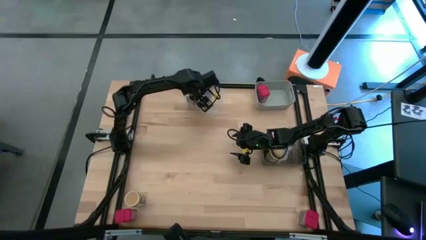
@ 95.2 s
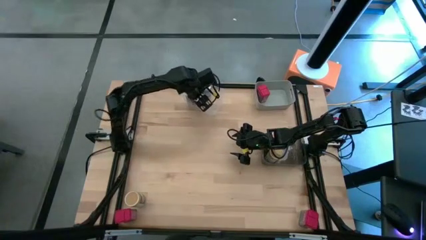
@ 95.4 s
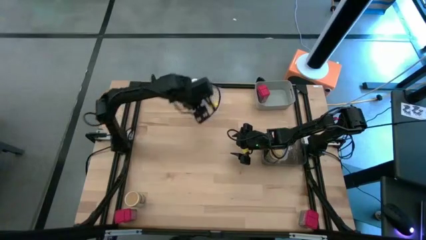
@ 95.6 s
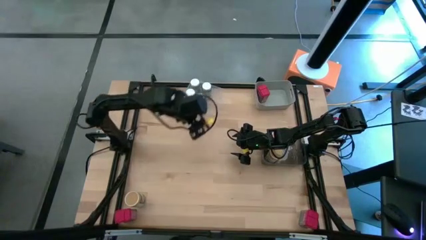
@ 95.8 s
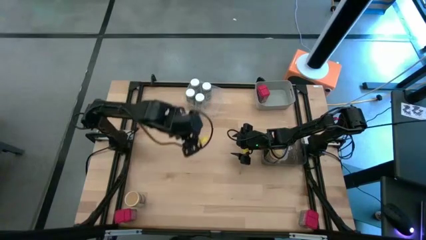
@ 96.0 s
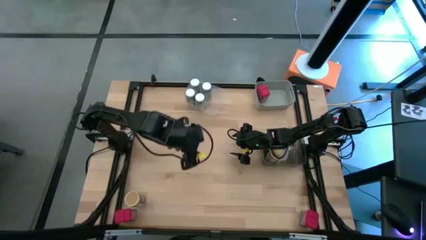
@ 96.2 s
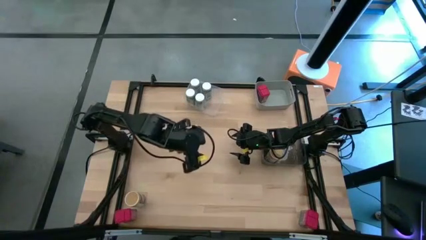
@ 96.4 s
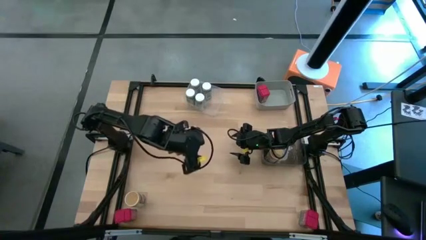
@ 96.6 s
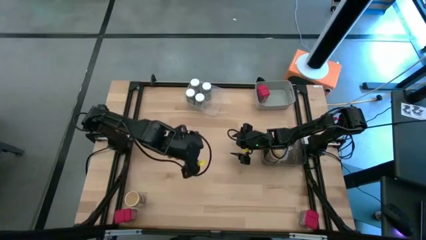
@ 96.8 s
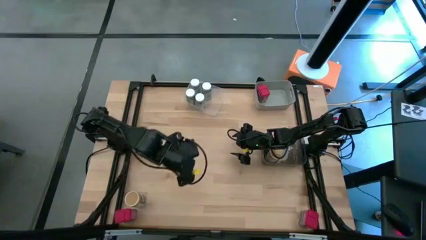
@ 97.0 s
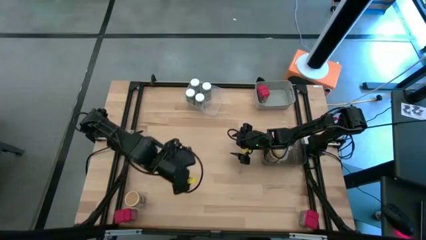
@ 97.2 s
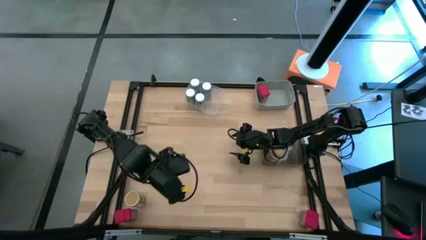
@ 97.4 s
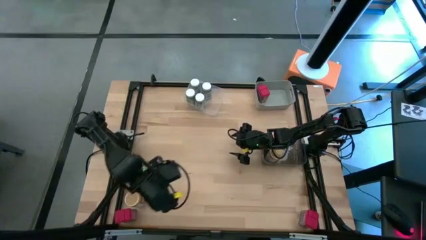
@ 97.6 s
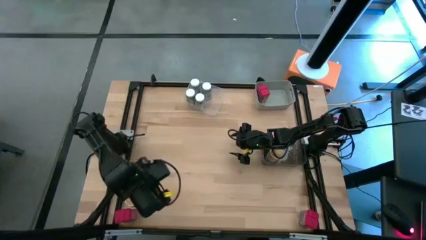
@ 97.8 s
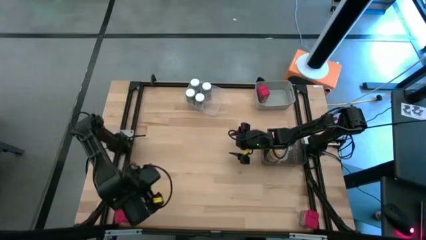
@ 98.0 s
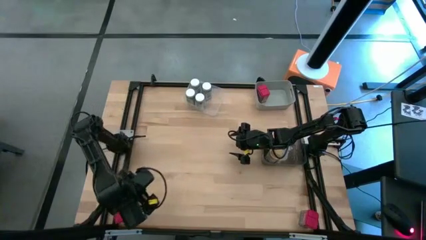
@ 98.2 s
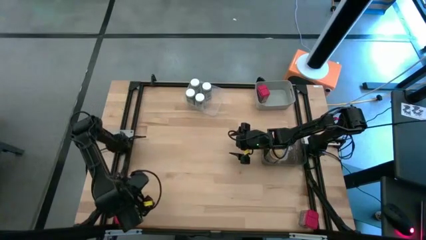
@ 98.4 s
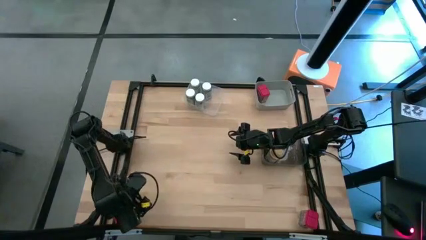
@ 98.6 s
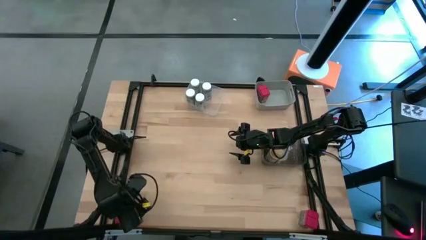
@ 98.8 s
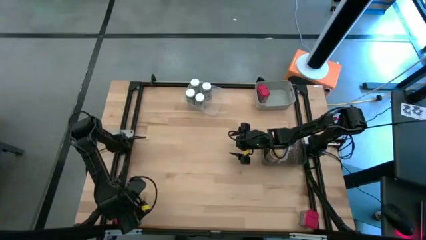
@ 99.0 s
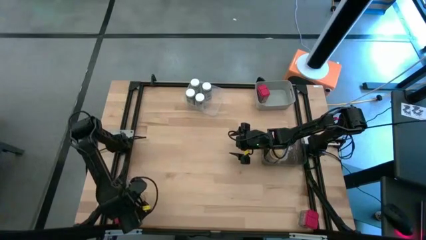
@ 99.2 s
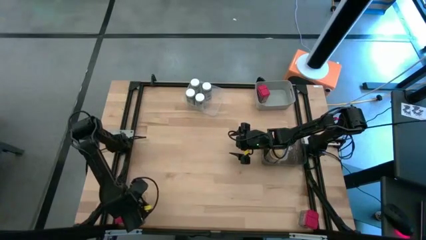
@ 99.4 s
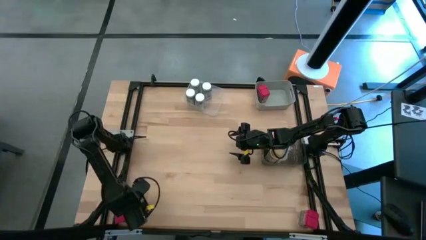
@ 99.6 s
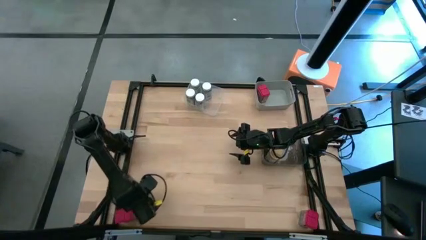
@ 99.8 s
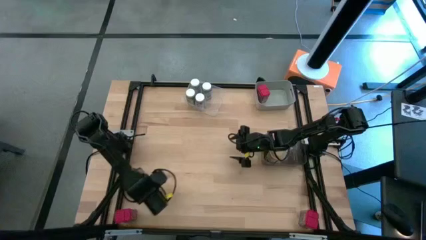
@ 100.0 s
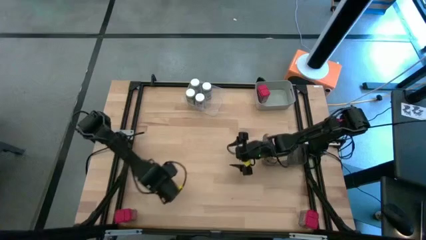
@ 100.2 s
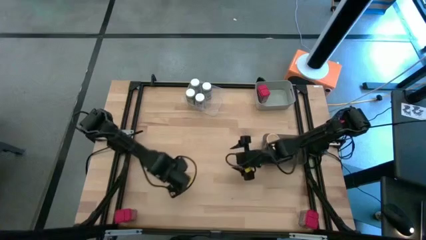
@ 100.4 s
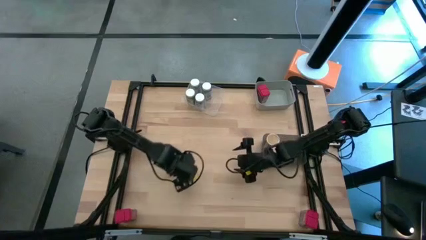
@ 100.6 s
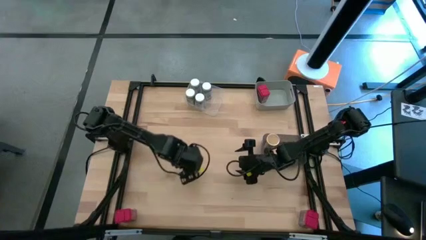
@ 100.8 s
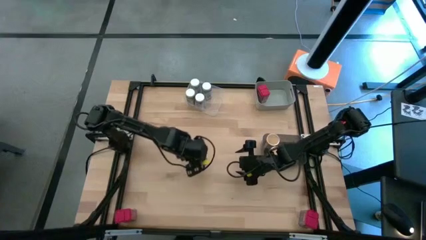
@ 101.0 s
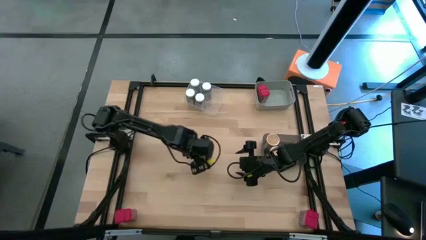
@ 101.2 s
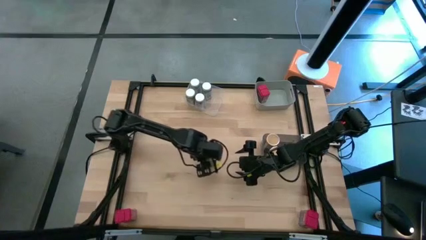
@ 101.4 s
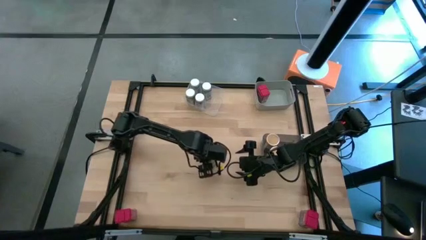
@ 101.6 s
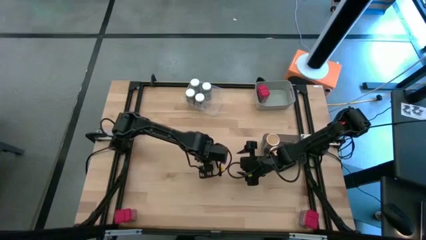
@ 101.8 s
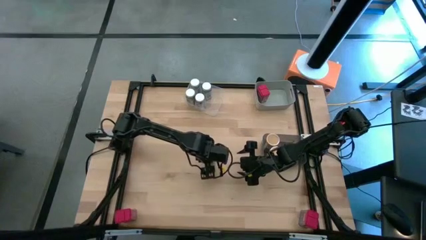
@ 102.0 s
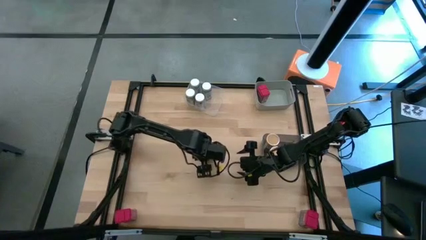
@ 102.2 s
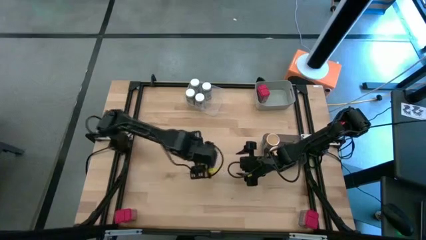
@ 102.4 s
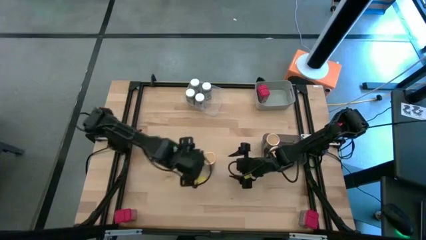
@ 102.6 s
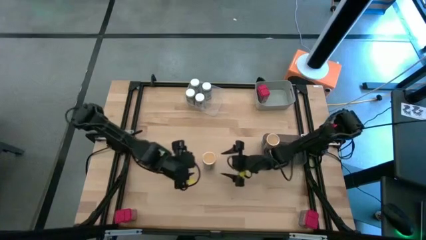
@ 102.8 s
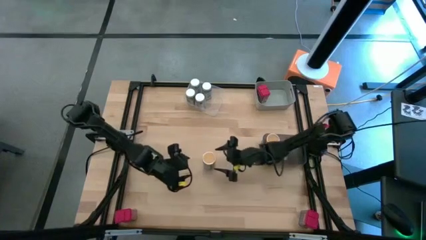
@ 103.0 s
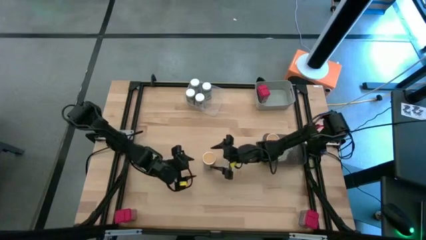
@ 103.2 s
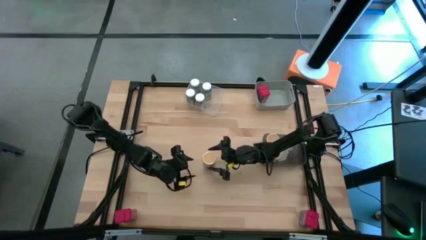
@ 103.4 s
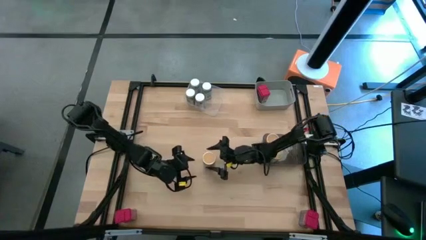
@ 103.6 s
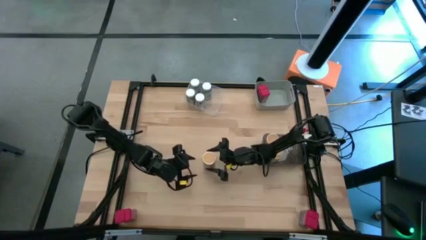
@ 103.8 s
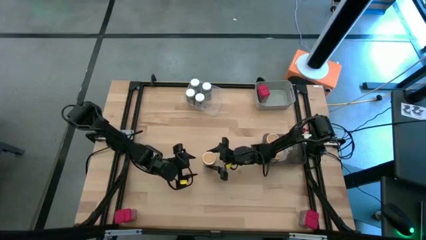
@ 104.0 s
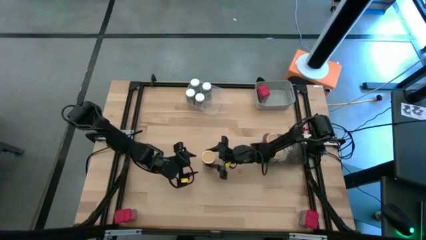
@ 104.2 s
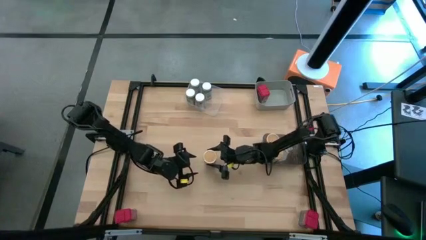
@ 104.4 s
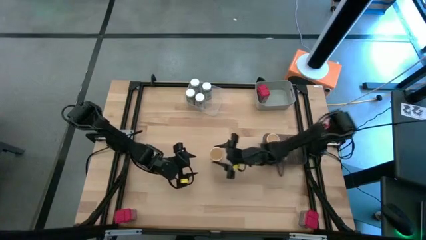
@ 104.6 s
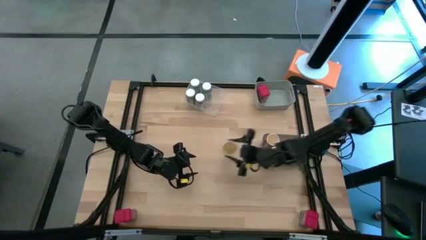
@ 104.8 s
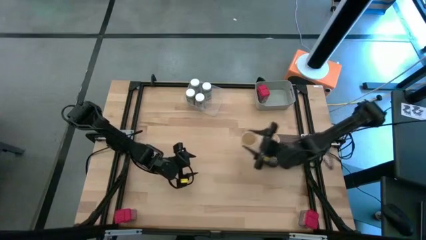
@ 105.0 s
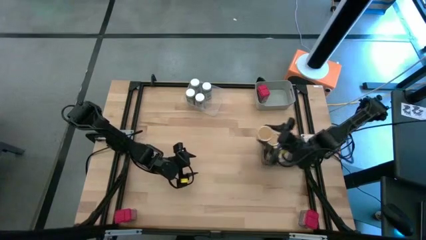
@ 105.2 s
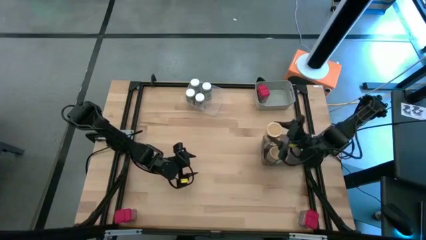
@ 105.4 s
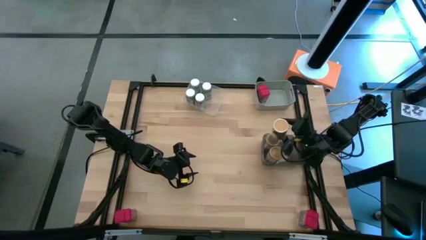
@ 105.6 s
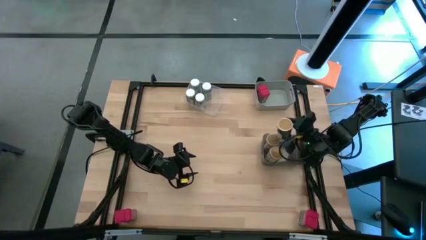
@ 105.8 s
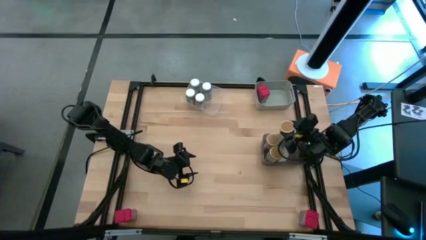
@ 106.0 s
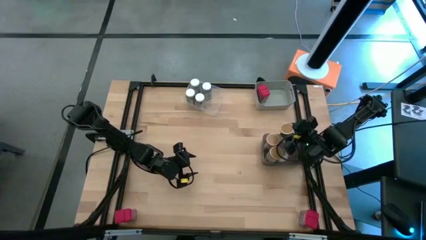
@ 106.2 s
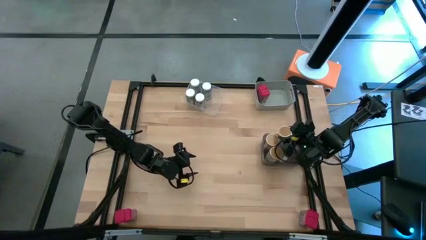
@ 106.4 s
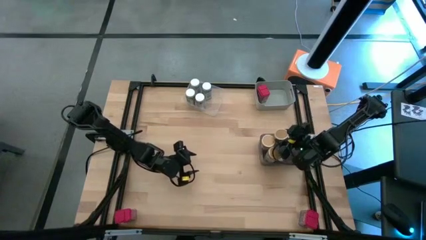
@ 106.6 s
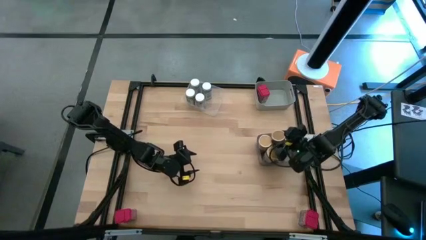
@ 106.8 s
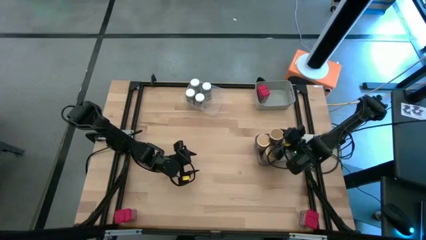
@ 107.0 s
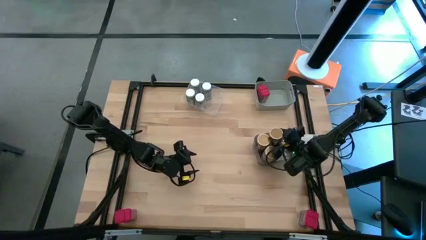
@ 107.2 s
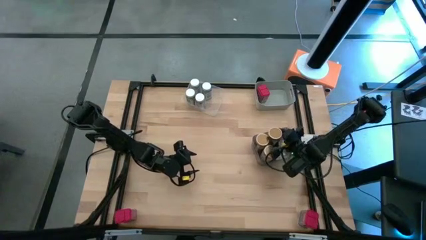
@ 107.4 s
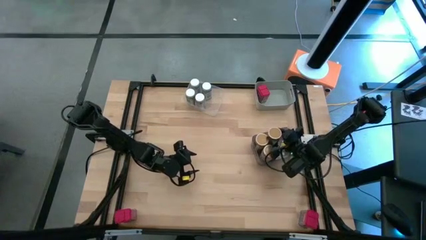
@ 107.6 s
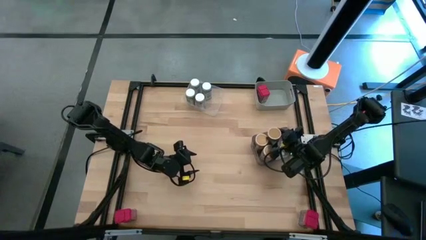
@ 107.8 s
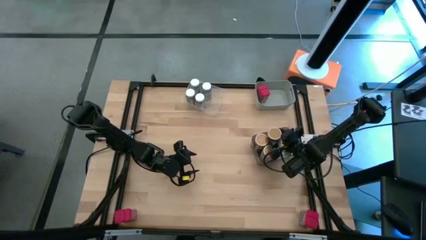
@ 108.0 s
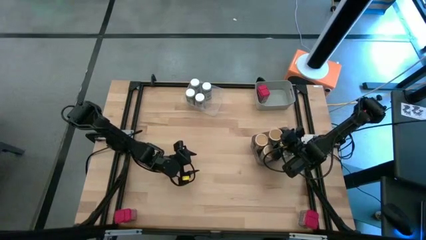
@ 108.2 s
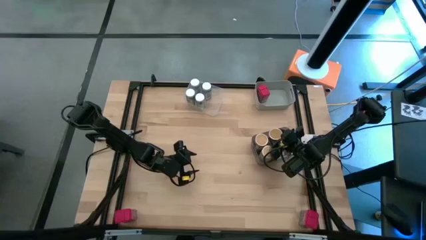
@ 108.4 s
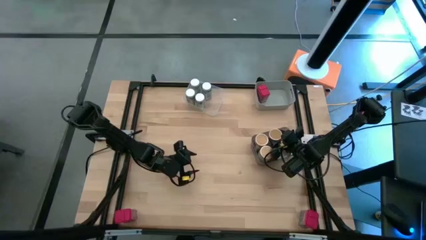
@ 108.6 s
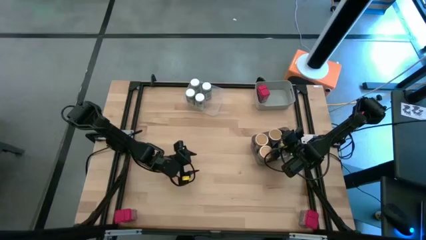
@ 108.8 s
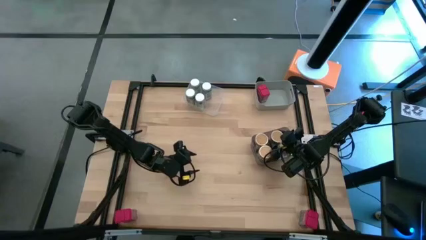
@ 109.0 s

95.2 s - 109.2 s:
Task: Sort spices by type
Put the brown seasoning bottle into the black bin
